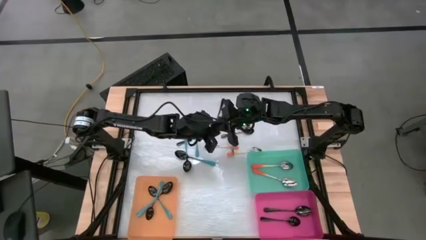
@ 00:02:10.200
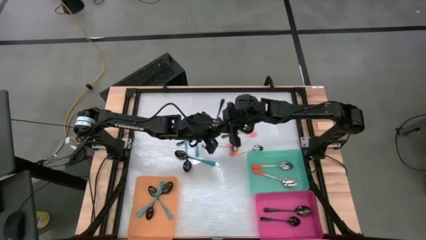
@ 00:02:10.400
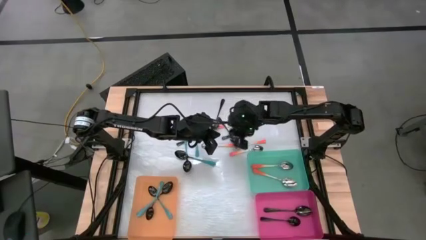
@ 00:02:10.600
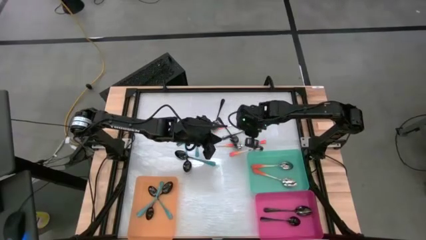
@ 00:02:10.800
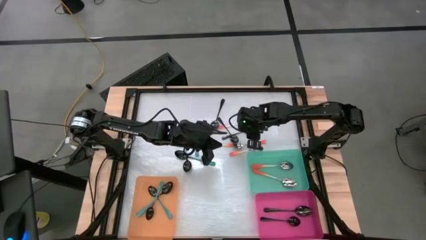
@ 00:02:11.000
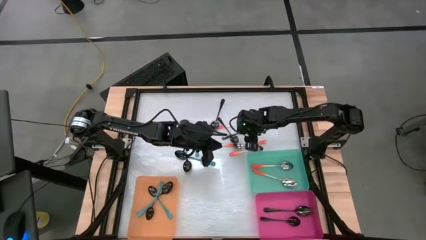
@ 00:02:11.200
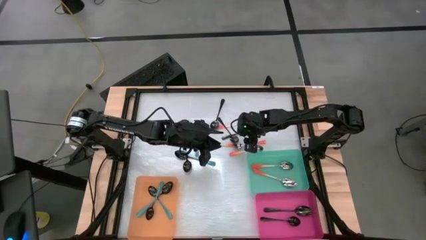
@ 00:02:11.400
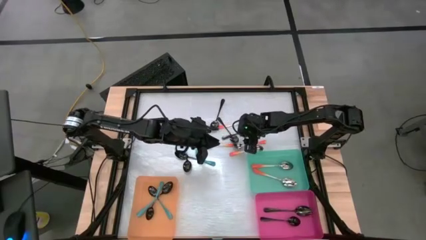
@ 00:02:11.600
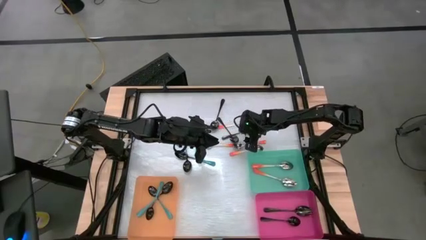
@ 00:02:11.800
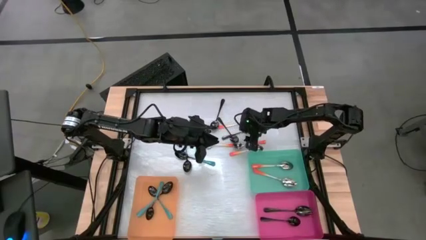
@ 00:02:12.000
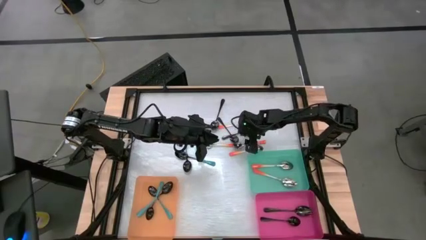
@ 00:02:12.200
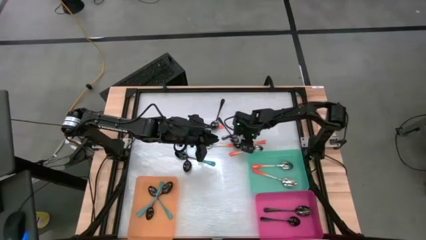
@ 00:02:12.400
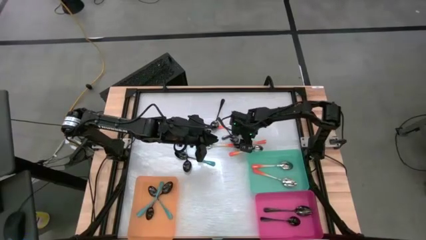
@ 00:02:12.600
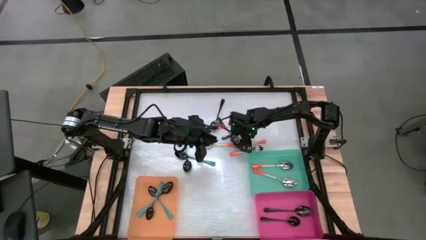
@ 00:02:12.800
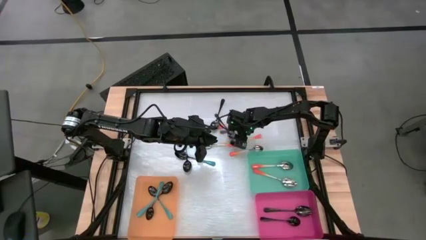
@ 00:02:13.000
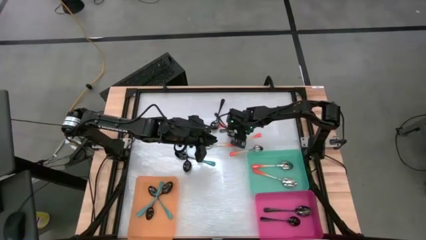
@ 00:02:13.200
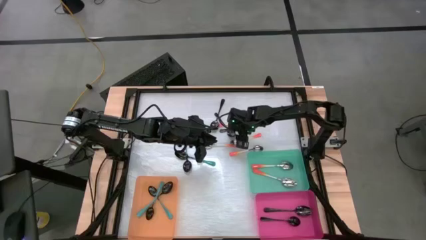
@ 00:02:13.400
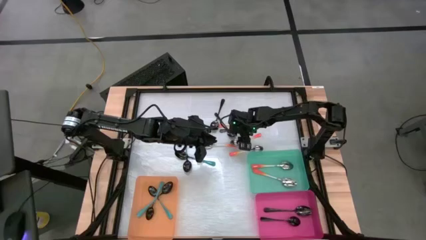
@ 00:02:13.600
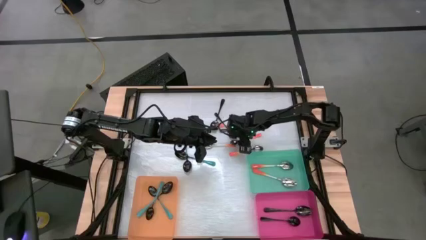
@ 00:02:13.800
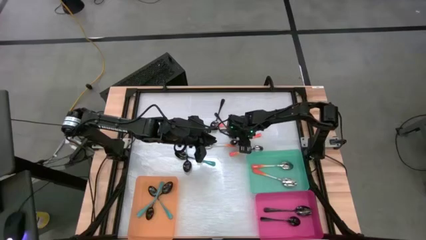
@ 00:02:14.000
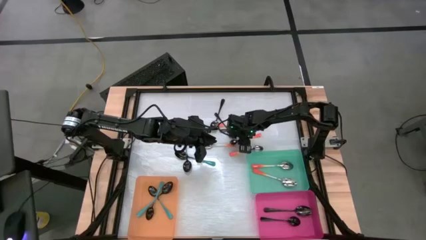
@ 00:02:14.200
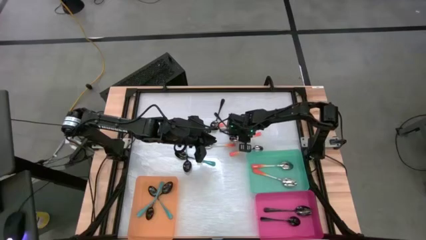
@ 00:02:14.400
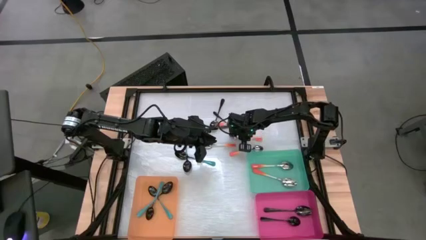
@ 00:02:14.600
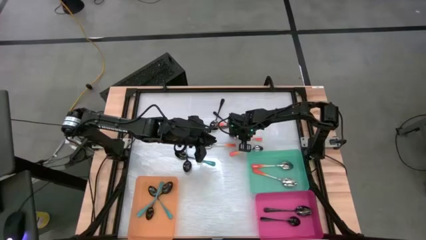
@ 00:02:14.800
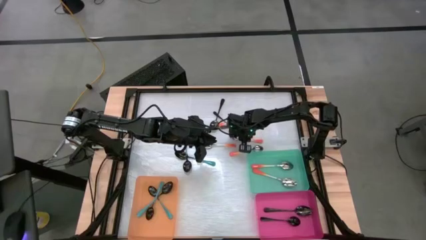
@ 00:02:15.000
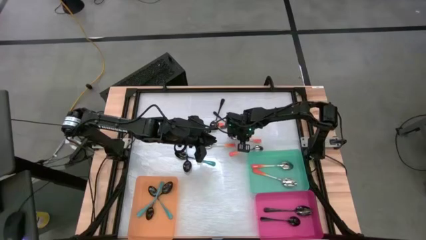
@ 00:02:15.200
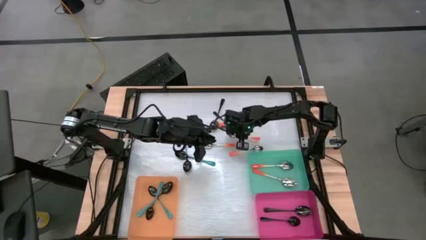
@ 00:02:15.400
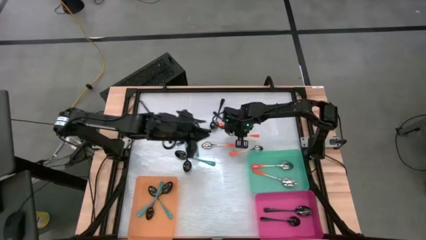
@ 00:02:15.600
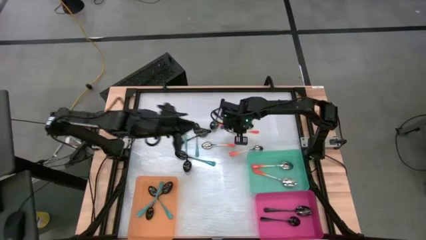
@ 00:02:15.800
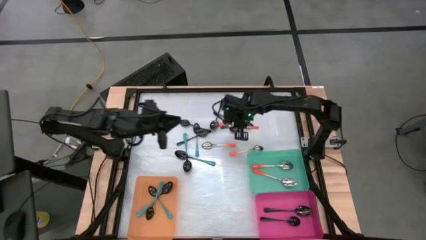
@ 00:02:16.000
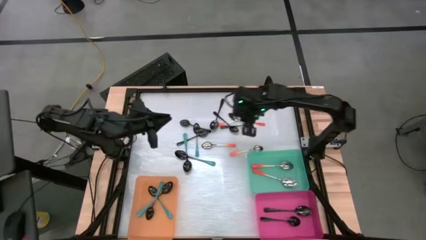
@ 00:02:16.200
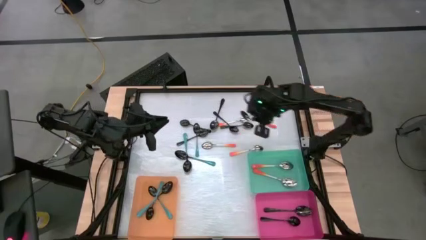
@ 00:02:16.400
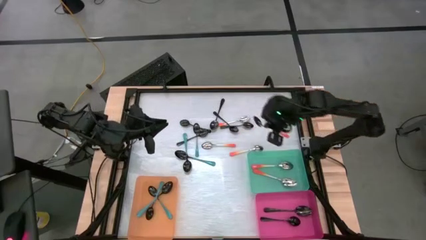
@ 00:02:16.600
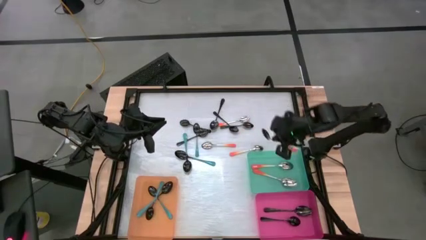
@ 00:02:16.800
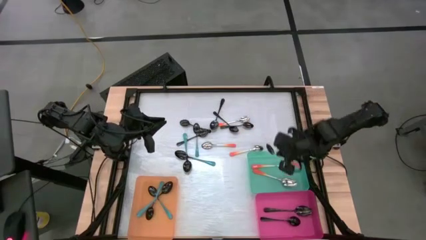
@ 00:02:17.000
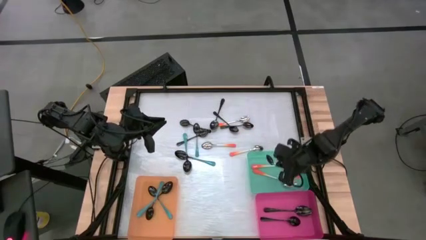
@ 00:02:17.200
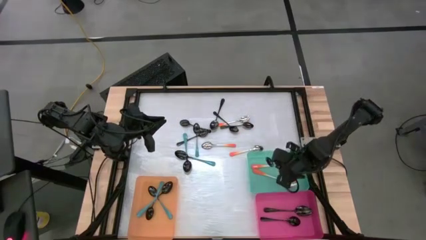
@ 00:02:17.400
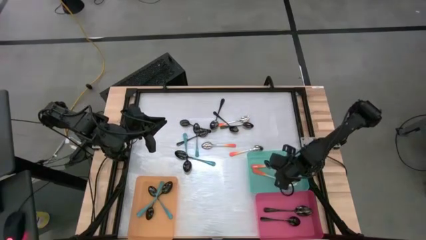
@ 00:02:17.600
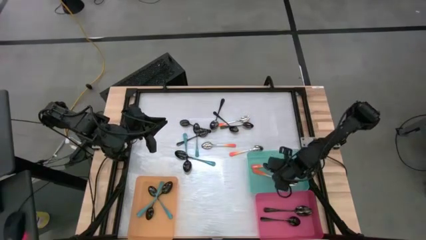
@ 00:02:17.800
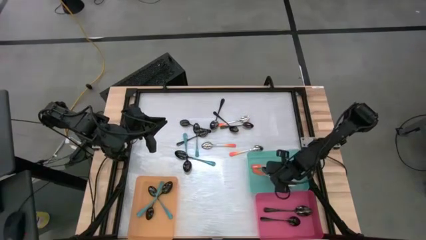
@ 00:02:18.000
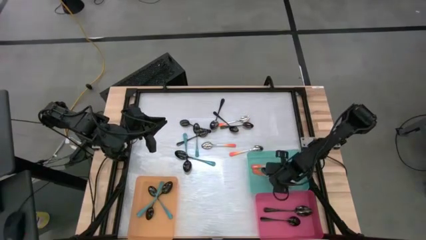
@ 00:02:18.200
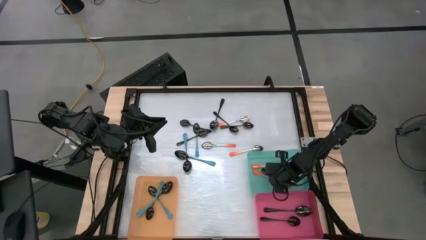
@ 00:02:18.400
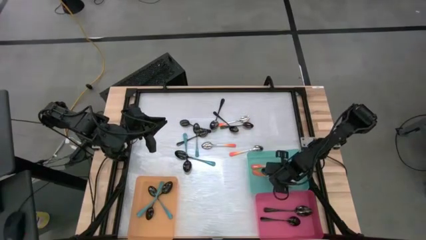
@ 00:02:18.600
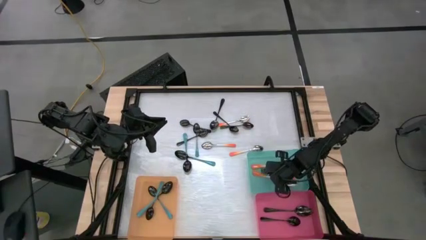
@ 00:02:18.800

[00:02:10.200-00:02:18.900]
Task: Sort silverware by color (type)
Put the orange spoon into the blue bin

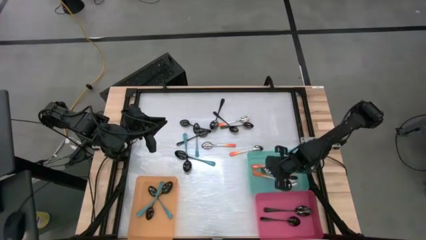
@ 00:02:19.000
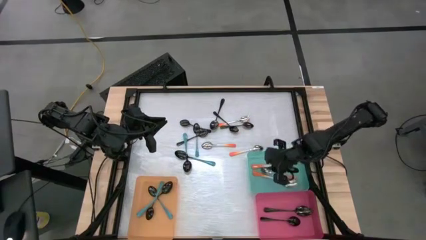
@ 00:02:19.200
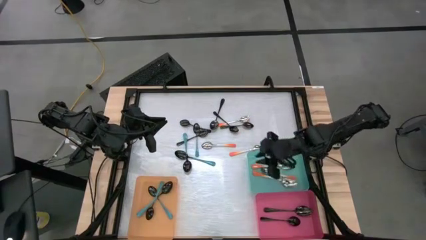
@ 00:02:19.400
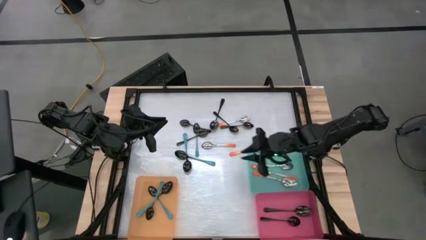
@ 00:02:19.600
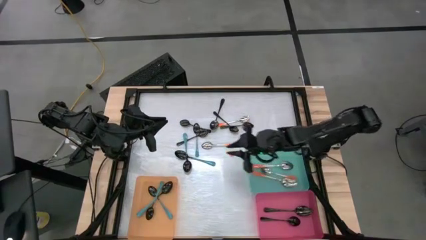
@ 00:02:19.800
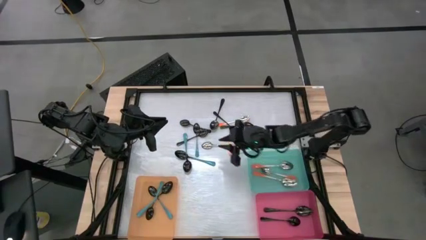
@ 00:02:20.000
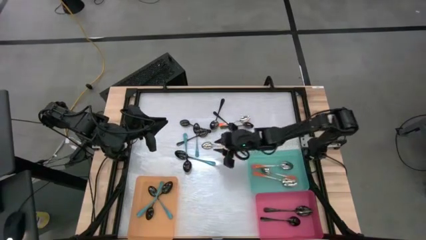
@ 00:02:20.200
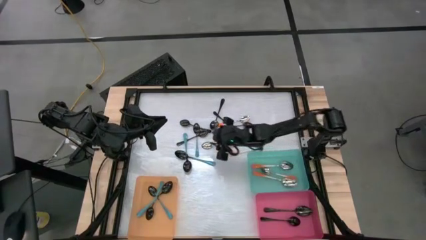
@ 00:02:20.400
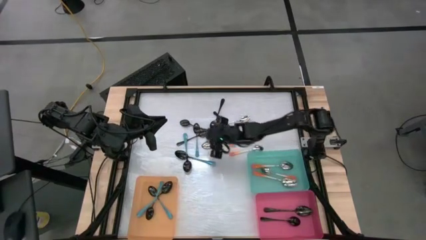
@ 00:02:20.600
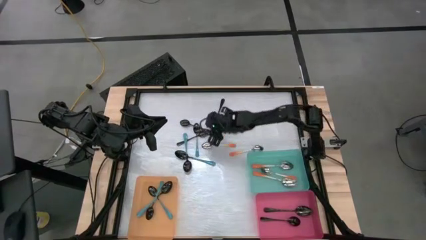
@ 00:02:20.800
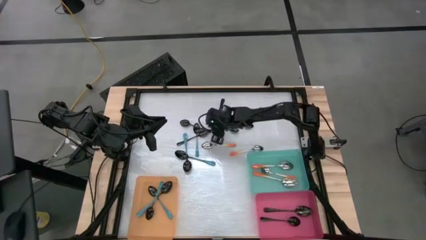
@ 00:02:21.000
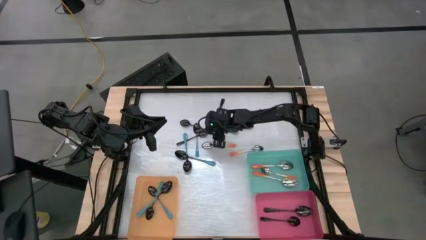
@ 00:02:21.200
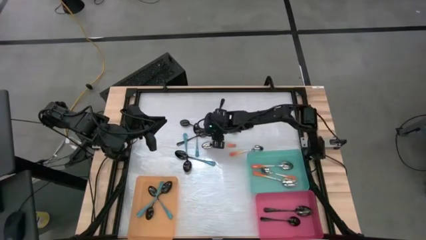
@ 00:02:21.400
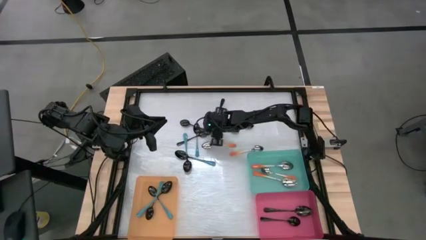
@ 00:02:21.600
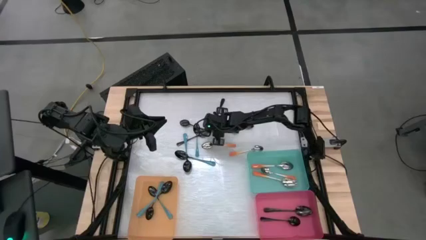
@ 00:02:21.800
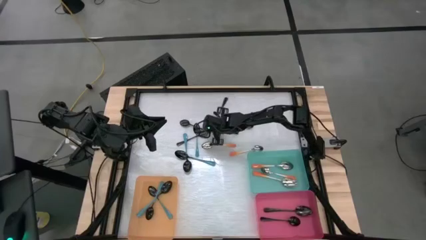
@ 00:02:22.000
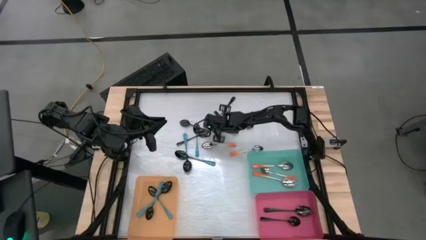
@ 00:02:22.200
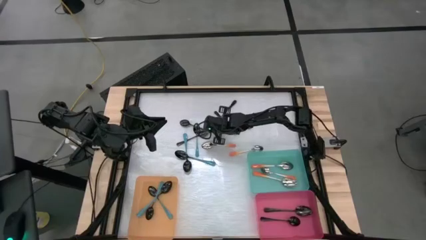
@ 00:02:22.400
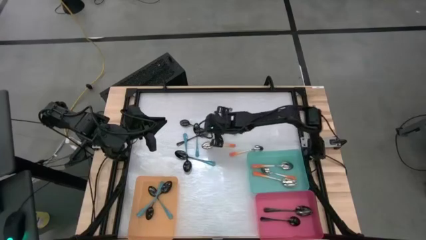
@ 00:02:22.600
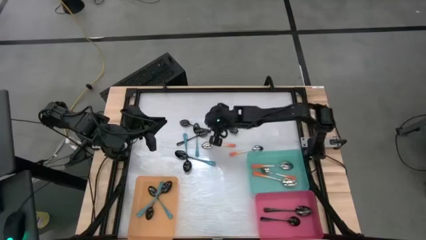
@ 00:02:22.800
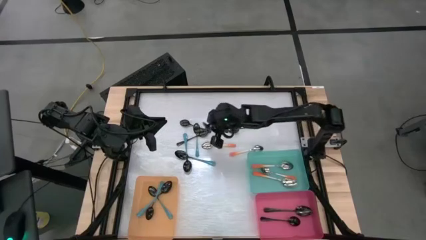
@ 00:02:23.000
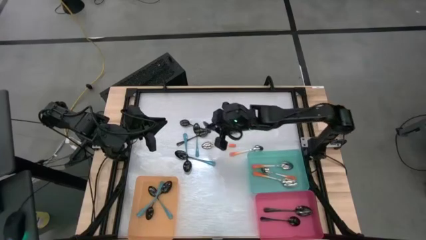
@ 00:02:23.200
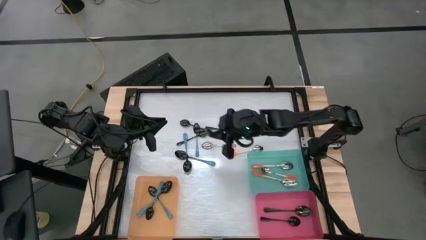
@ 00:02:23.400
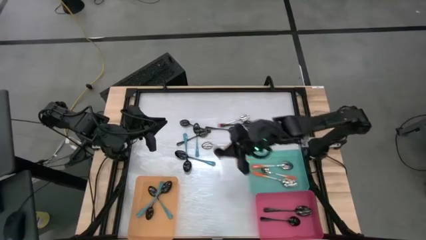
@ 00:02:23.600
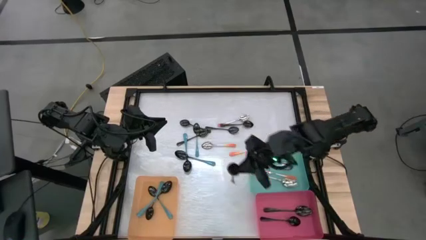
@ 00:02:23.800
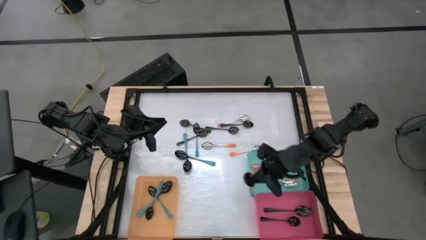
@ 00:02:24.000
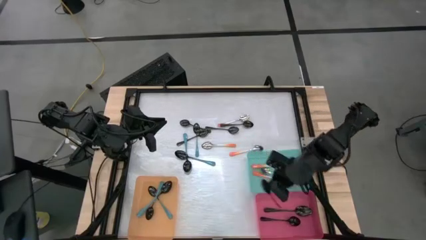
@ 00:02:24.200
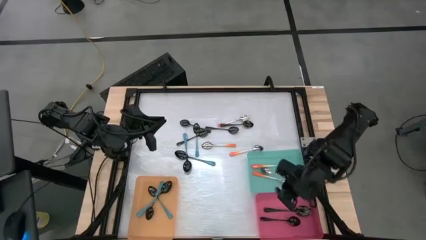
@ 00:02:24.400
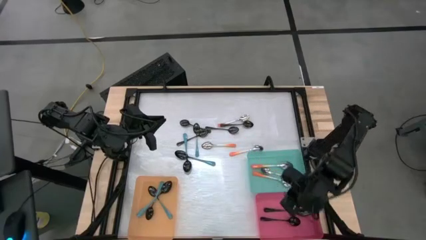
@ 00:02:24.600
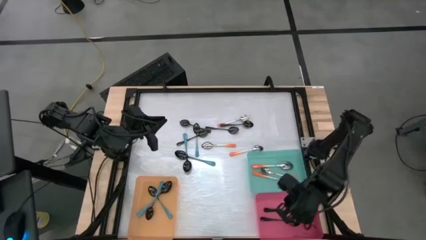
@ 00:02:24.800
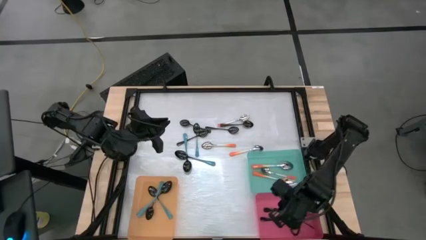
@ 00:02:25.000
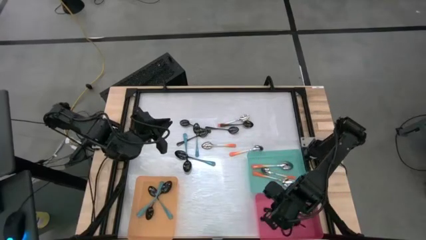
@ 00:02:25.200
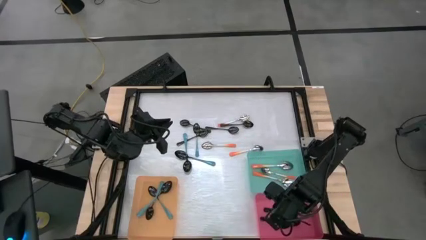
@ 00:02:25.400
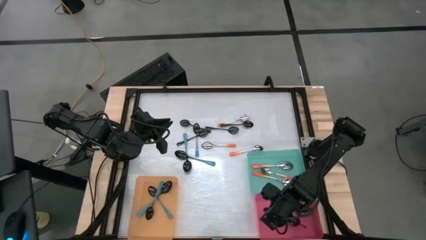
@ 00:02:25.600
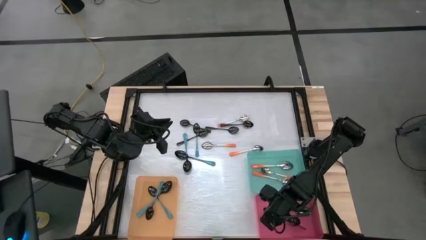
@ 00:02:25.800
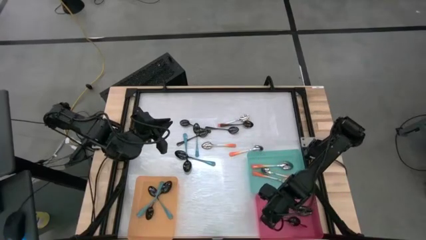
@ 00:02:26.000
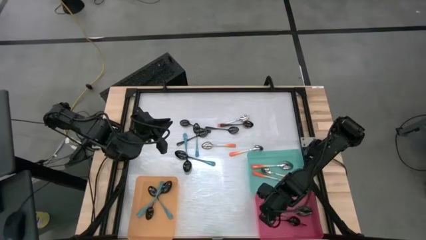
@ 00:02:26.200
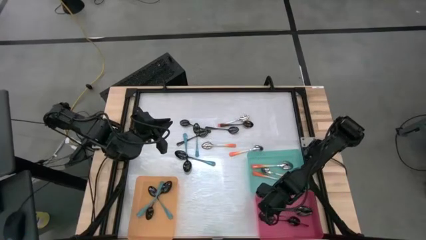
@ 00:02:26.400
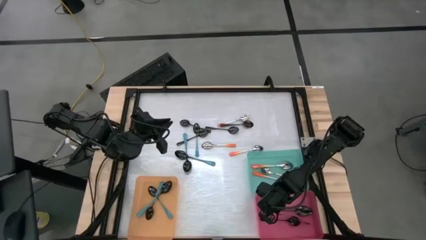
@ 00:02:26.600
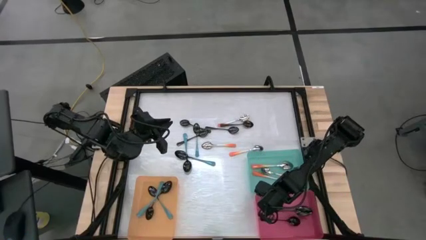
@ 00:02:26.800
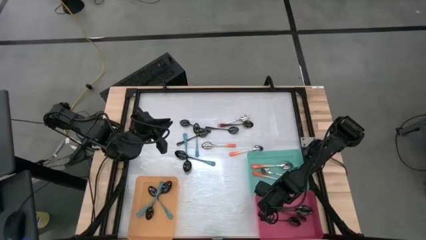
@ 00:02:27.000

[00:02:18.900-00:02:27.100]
Put the black spoon into the pink bin
